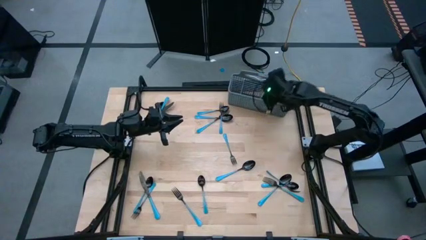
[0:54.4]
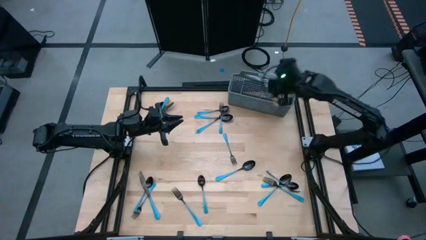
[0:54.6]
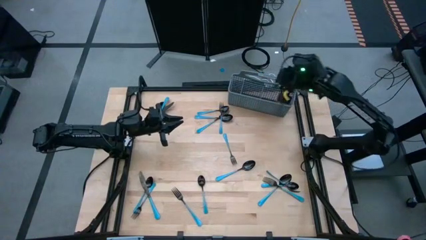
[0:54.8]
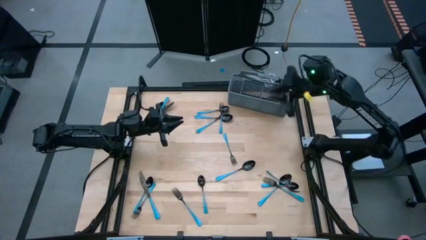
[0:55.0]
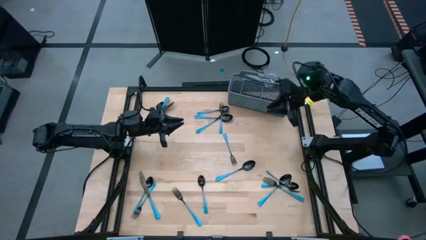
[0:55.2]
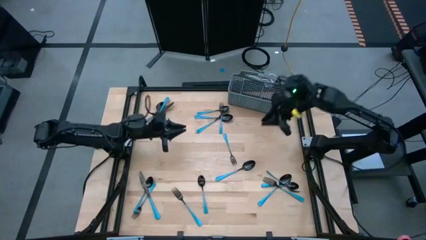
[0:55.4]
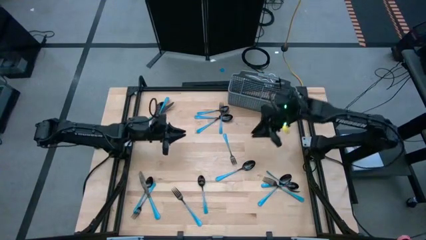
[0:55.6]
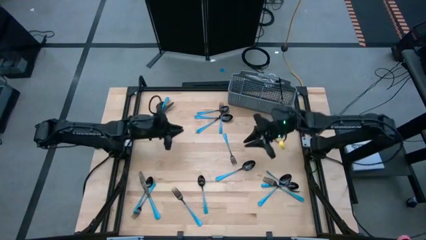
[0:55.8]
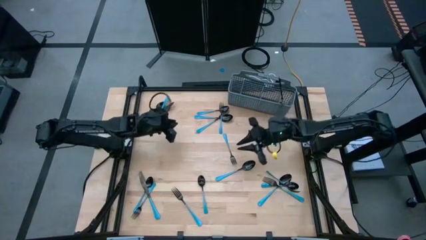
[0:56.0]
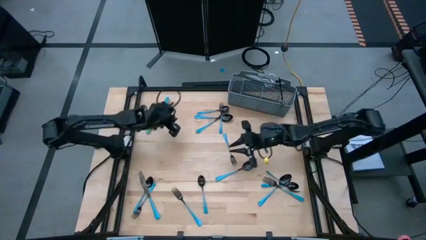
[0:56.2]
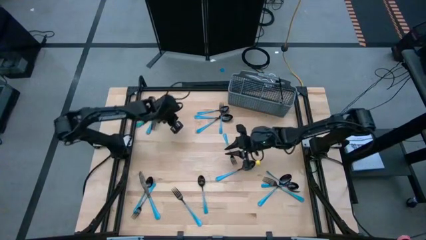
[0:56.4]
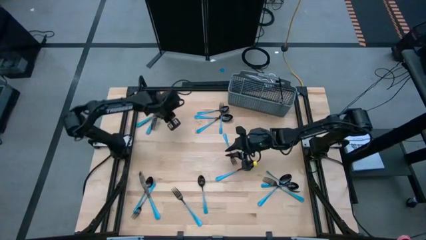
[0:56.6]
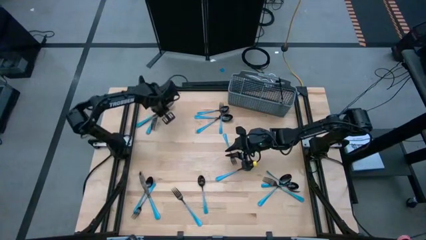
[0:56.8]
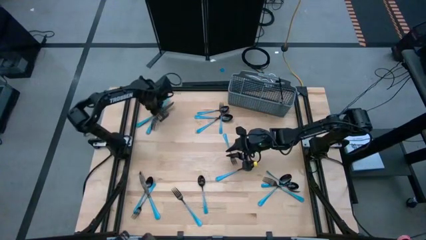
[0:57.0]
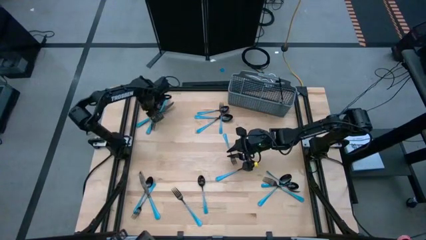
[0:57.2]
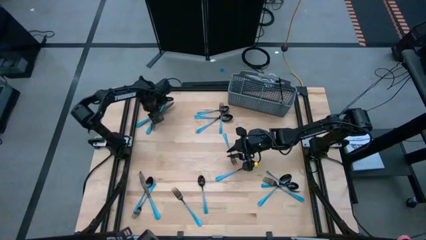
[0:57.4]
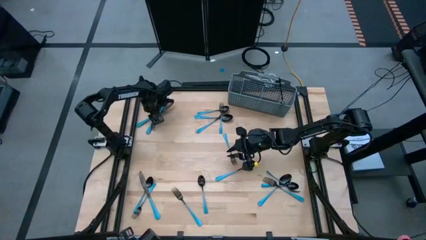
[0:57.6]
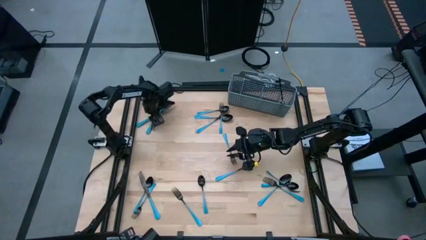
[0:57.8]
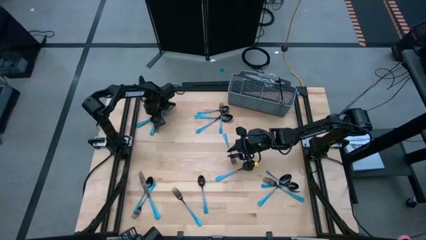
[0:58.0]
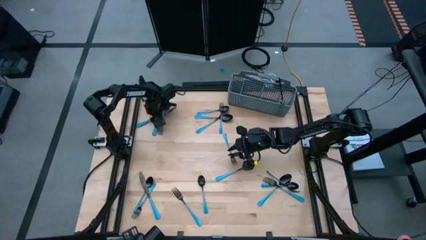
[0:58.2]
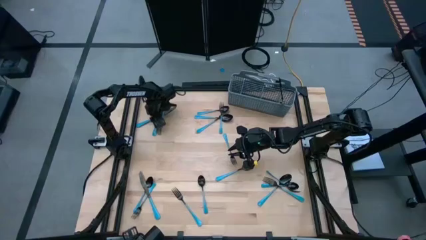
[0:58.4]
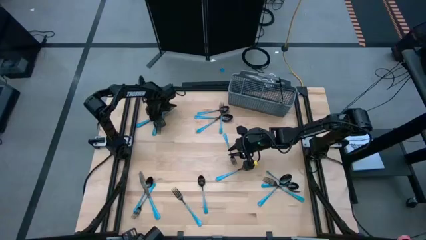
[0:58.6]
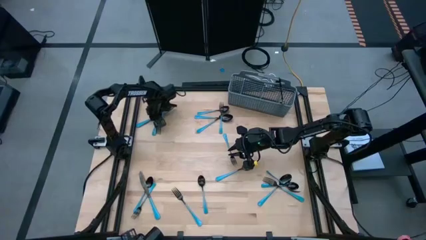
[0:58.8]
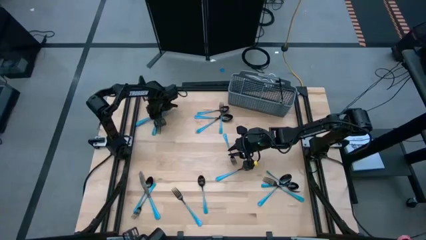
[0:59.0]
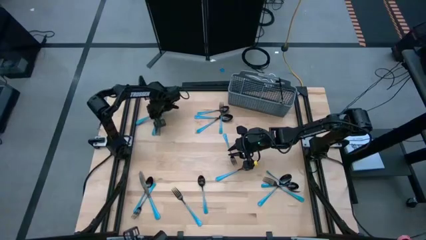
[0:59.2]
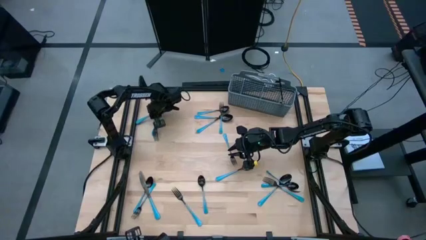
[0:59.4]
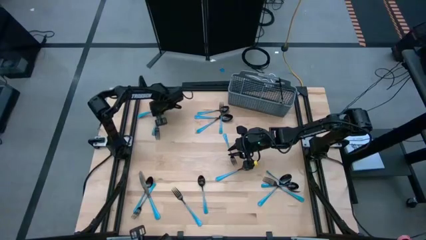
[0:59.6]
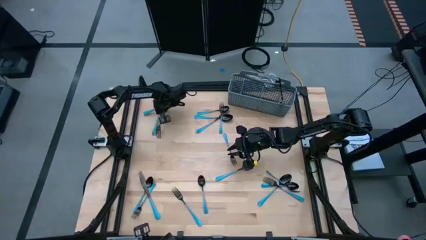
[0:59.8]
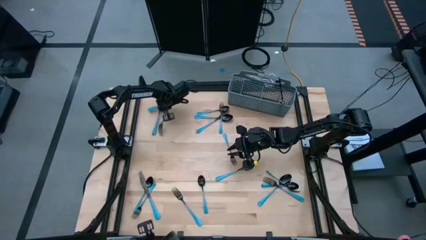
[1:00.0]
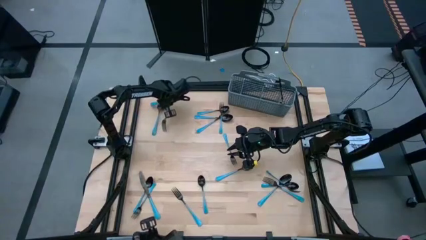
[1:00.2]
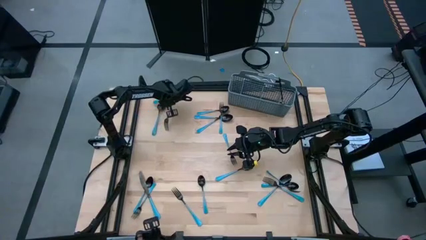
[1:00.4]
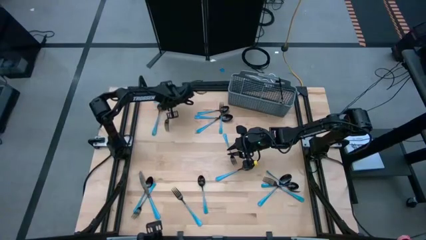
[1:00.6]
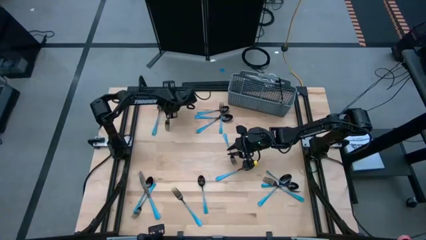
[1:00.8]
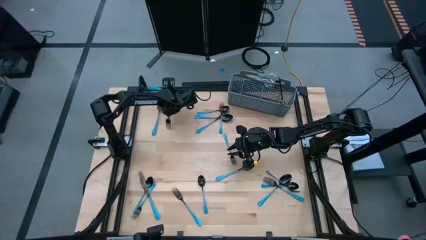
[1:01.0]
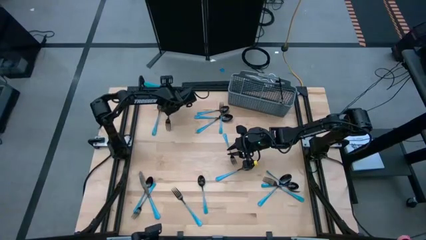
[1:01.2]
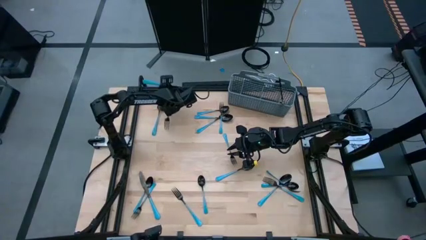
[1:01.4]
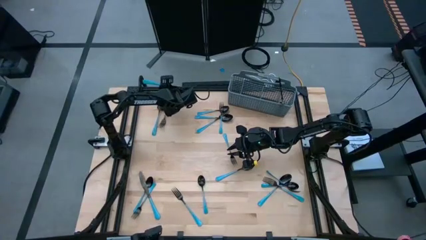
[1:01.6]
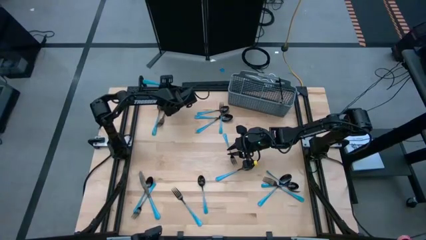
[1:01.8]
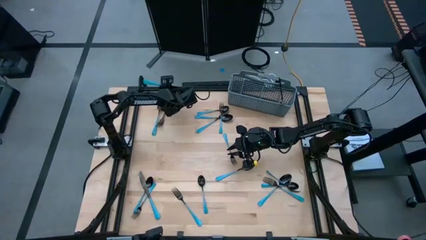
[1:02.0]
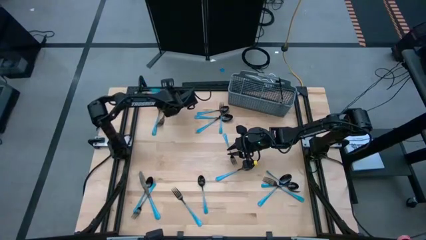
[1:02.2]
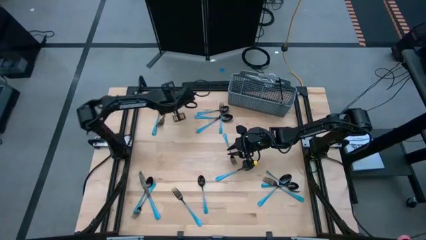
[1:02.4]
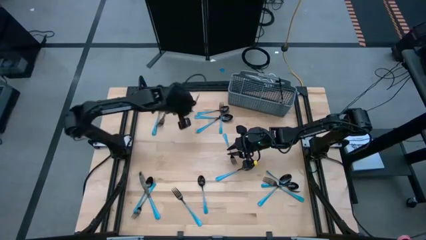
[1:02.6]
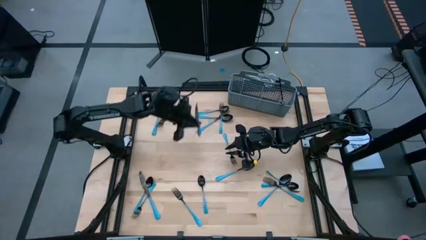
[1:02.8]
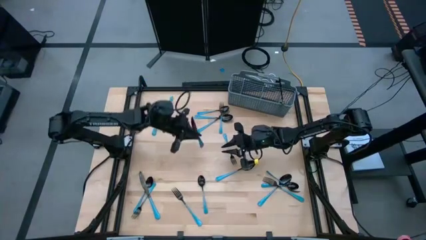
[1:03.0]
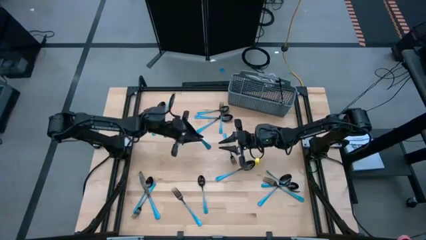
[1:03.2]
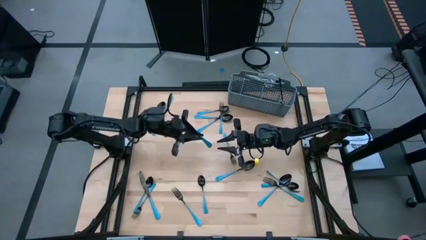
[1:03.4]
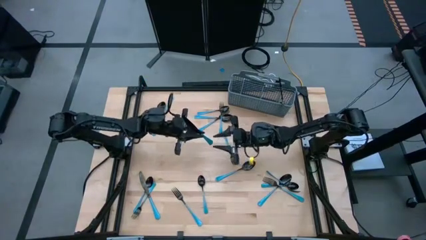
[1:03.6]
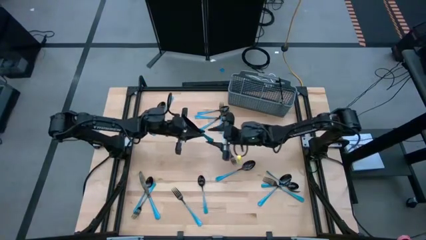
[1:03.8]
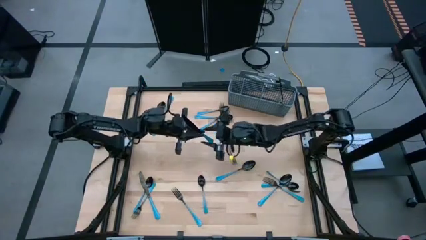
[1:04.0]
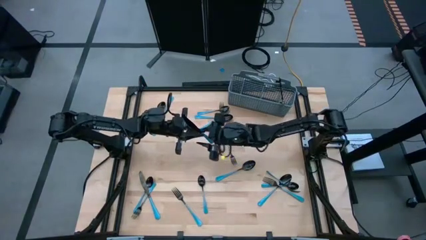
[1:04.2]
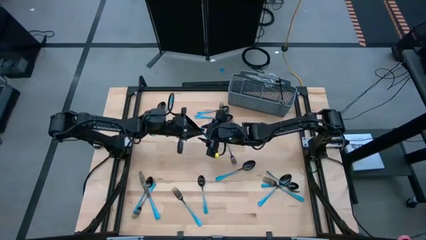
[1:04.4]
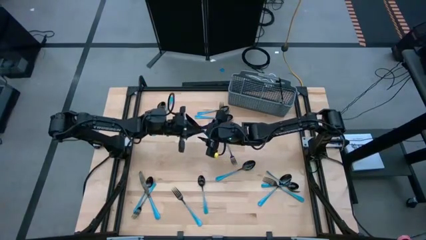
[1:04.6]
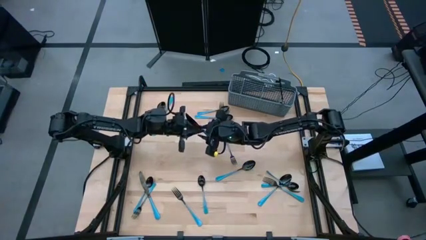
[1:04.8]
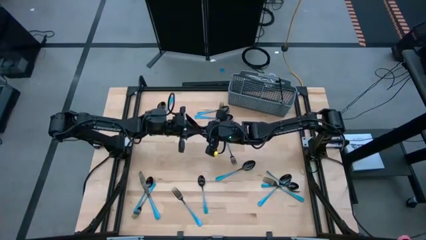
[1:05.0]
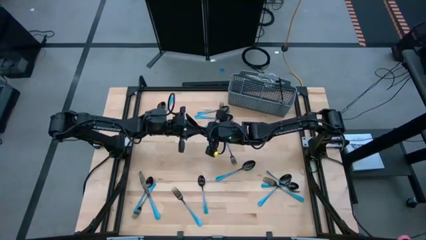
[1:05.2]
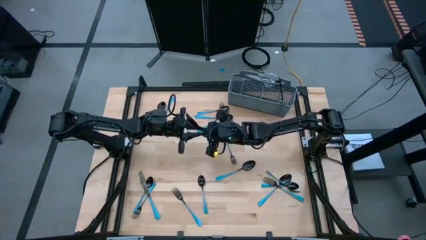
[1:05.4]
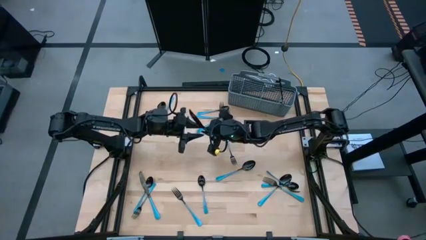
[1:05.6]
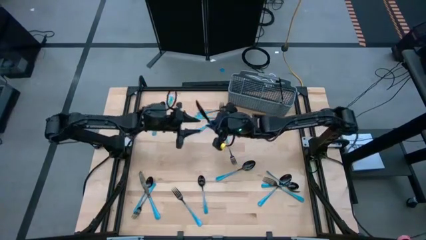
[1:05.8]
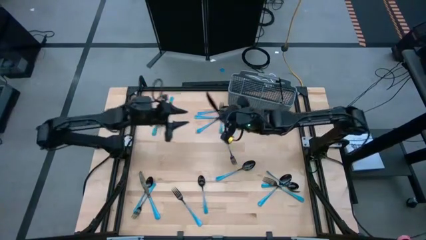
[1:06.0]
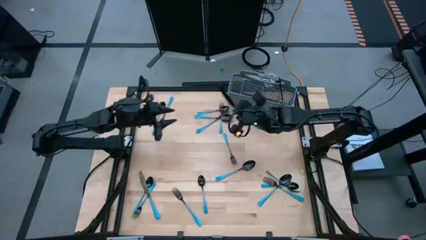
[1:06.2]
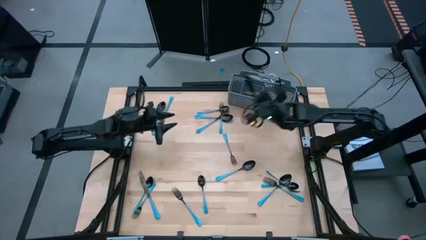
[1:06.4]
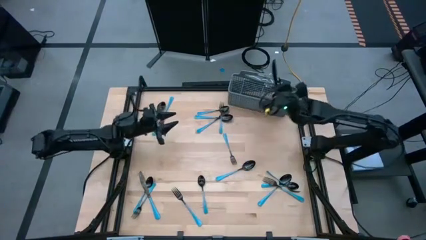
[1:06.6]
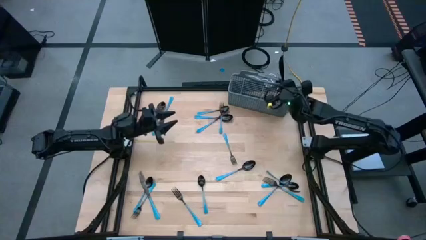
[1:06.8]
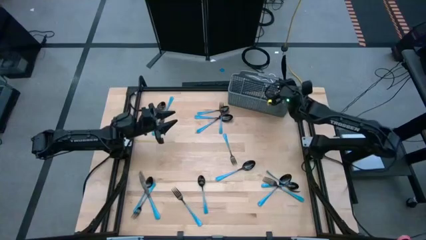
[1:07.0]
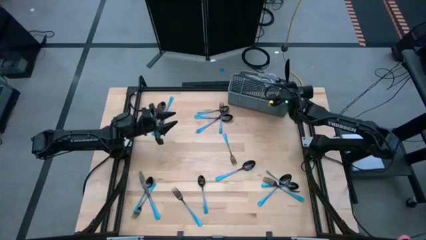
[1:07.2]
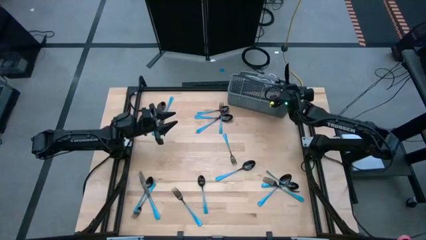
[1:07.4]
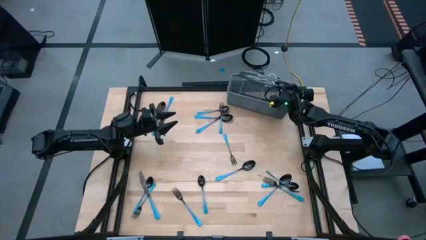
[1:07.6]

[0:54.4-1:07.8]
Task: Sort silverware
Put the blue knife into the right of the blue utensil organizer

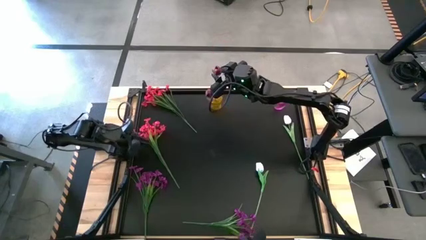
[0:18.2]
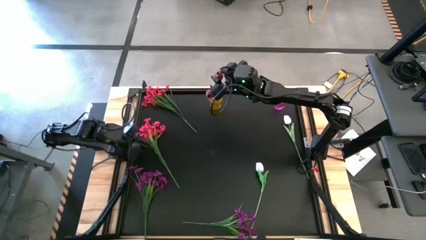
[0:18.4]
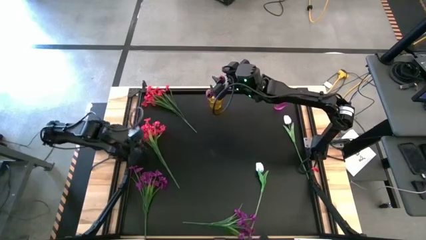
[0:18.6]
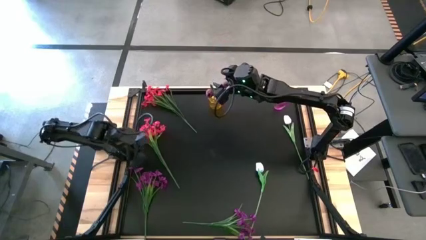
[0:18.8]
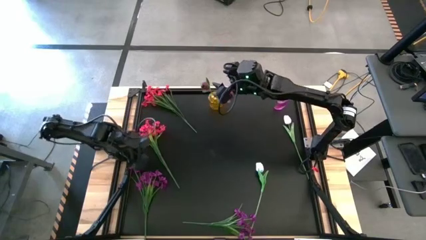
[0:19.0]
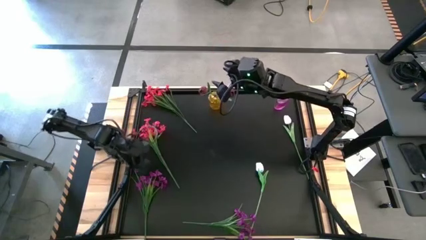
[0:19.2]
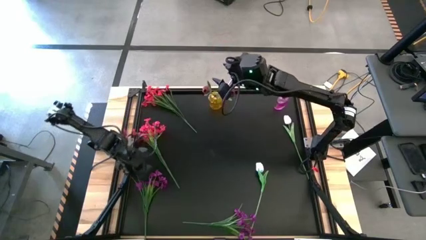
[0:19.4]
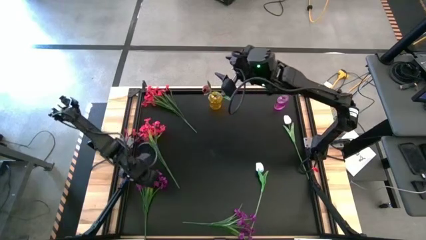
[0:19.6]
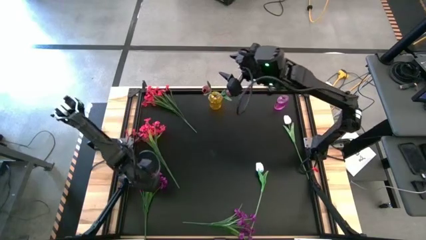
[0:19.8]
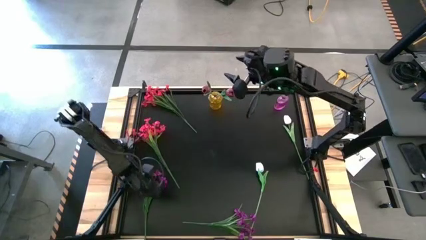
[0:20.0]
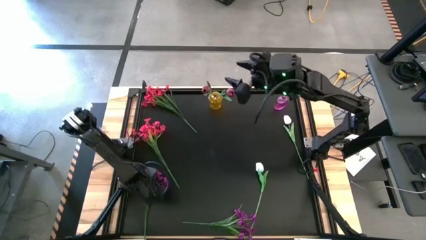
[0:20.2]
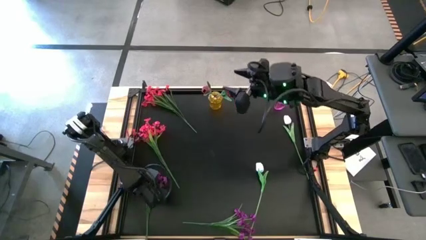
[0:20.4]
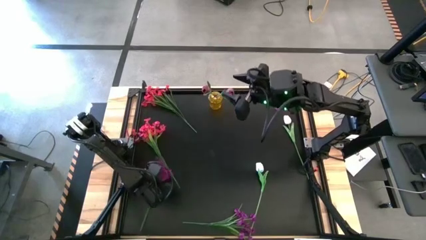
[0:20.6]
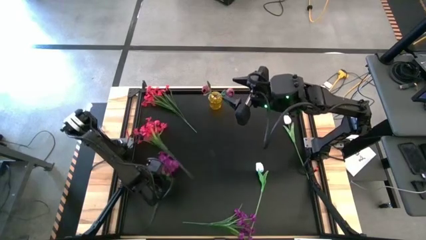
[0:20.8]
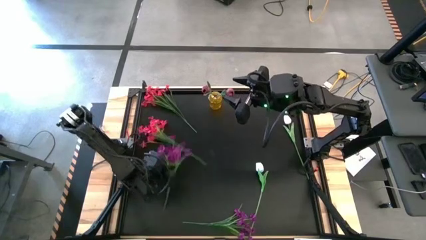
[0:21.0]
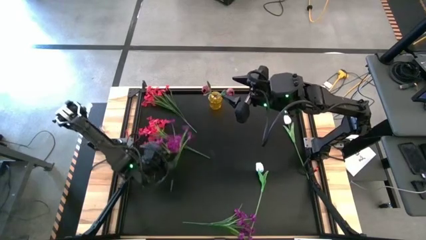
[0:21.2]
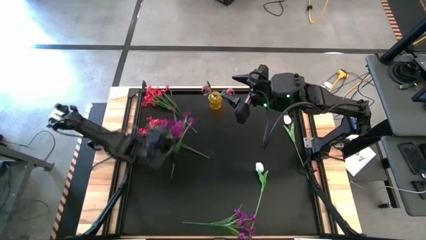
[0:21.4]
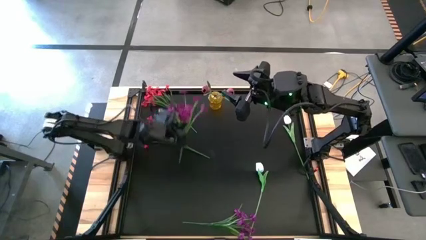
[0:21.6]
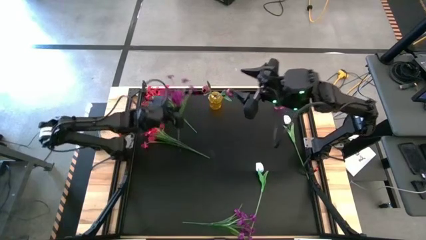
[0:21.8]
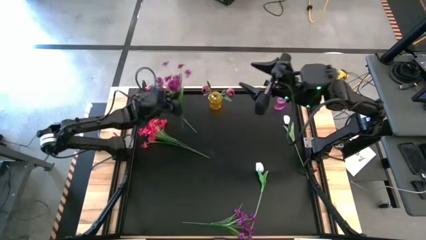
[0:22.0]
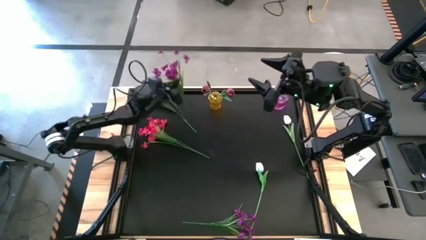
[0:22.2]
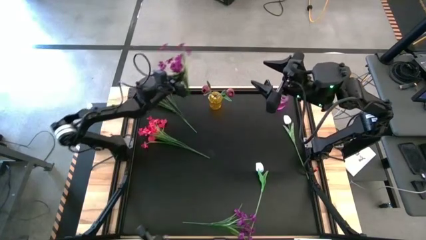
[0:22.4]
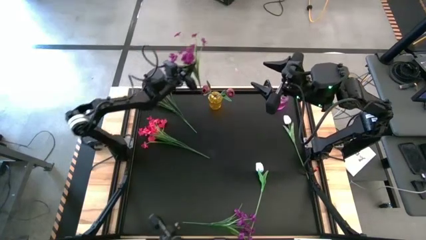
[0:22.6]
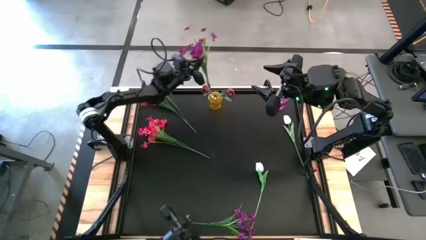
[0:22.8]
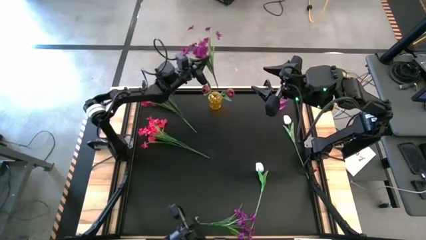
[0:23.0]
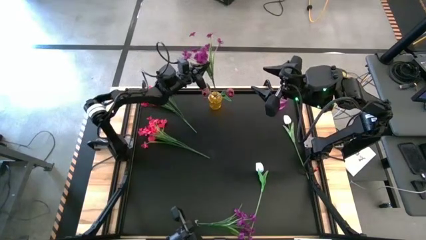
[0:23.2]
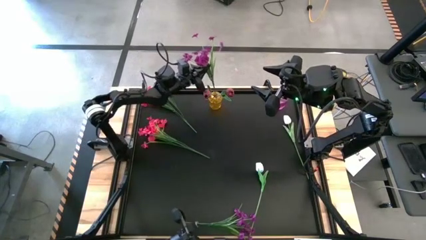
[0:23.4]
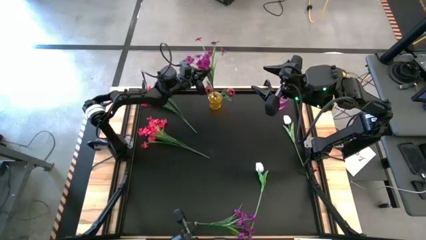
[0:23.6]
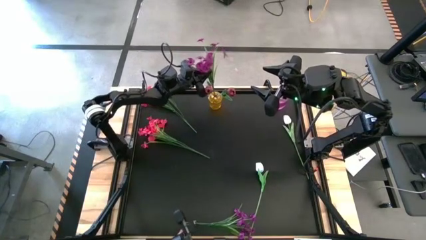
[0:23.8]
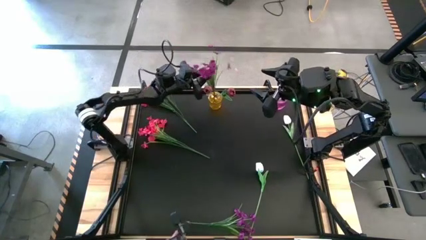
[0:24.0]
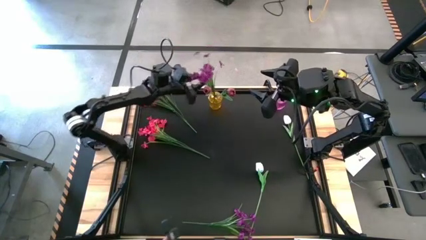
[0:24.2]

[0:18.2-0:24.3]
Task: Sort flowers into vase by color
Put the left violet flowers into the yellow flower vase
